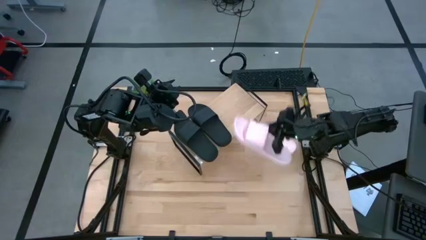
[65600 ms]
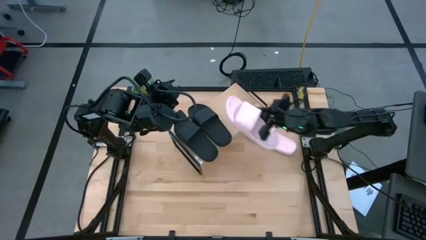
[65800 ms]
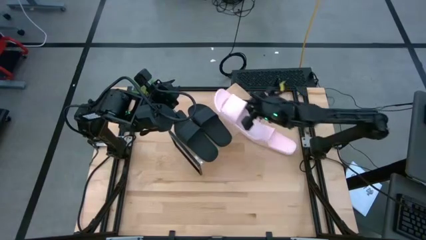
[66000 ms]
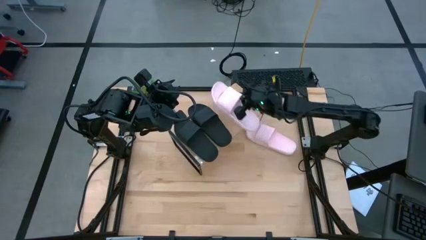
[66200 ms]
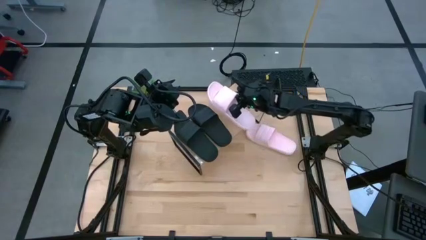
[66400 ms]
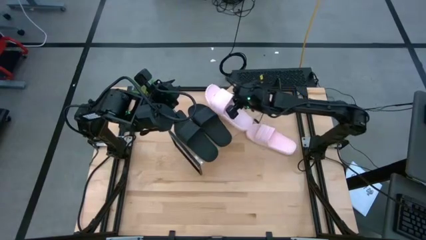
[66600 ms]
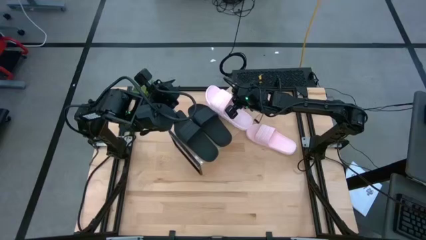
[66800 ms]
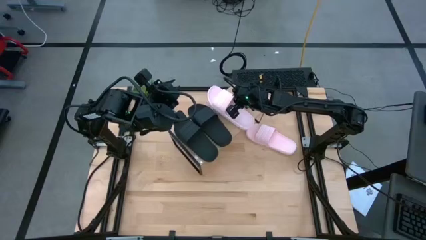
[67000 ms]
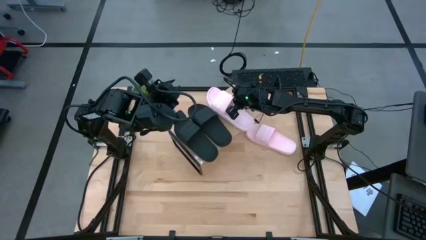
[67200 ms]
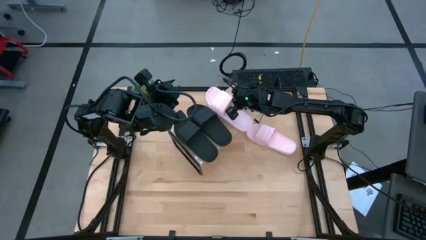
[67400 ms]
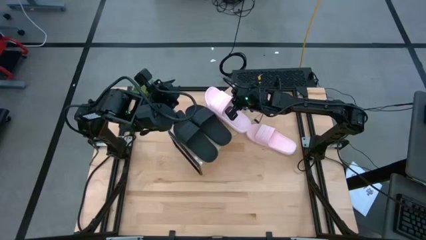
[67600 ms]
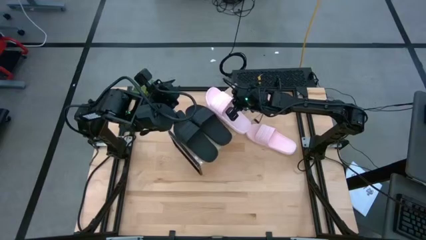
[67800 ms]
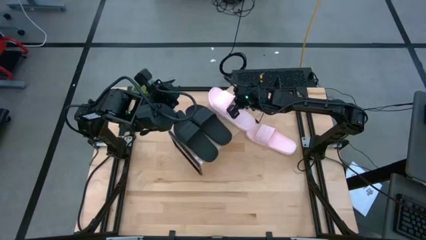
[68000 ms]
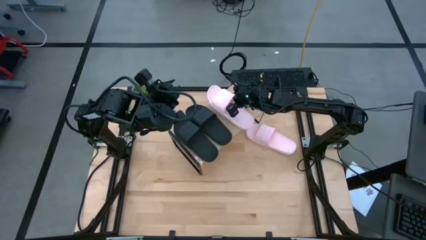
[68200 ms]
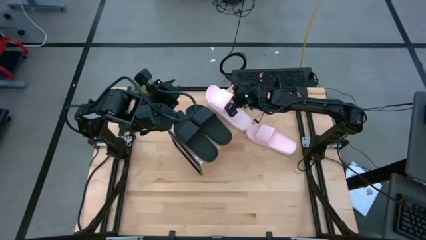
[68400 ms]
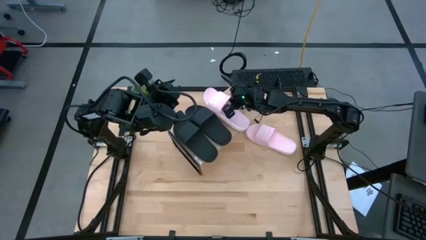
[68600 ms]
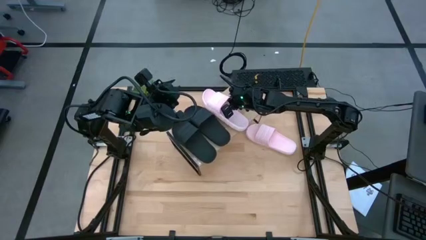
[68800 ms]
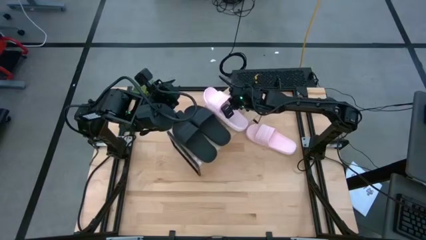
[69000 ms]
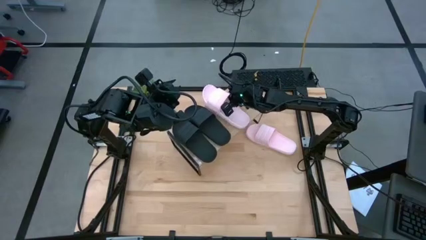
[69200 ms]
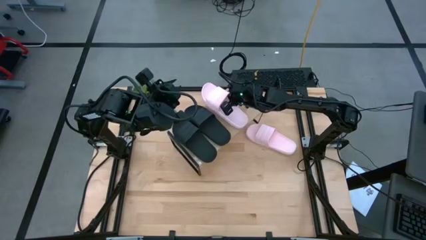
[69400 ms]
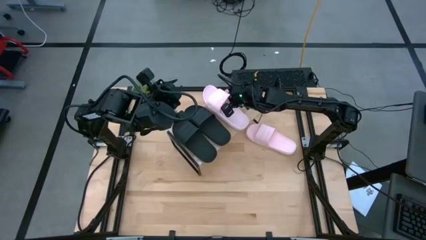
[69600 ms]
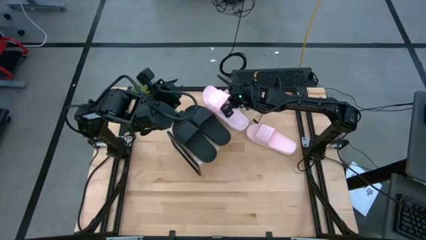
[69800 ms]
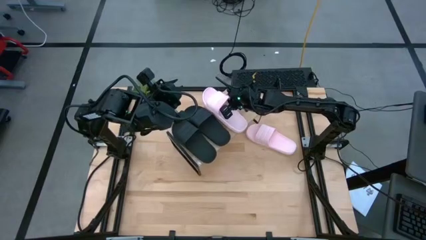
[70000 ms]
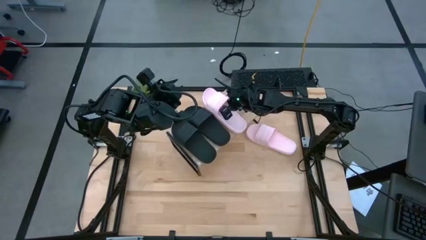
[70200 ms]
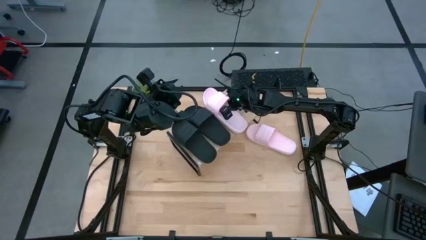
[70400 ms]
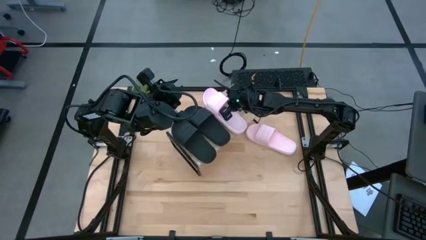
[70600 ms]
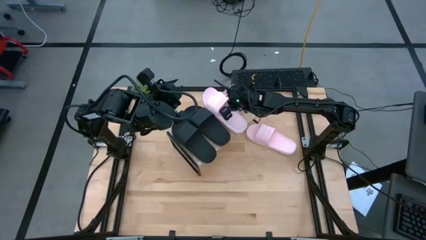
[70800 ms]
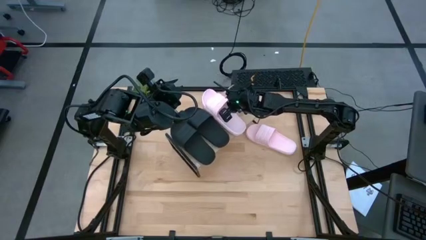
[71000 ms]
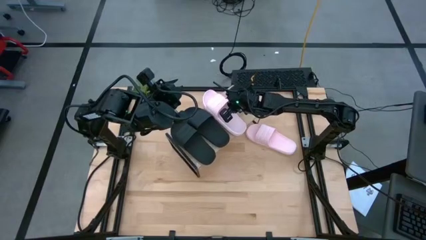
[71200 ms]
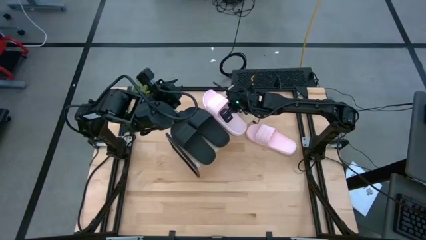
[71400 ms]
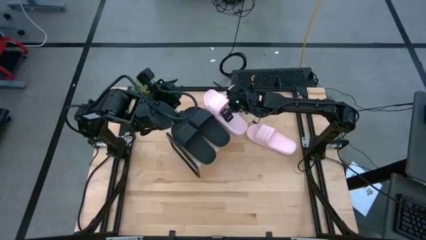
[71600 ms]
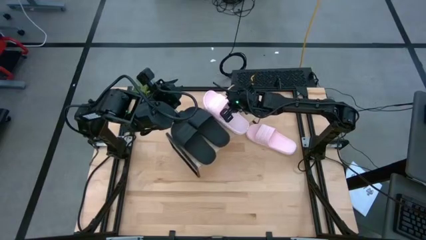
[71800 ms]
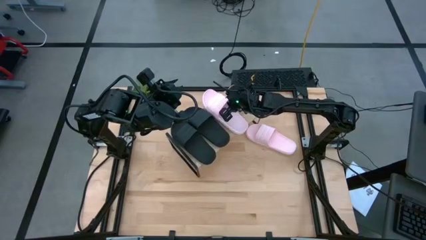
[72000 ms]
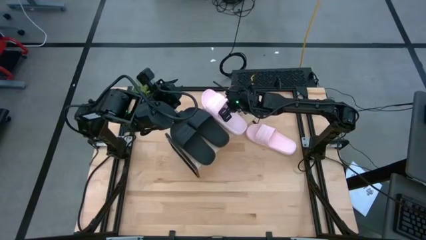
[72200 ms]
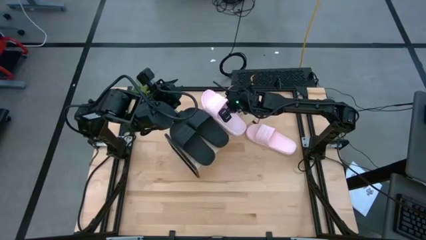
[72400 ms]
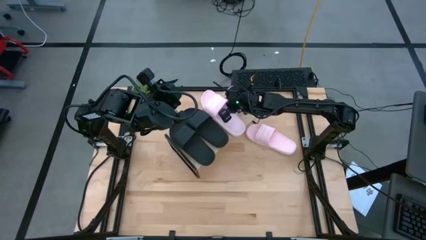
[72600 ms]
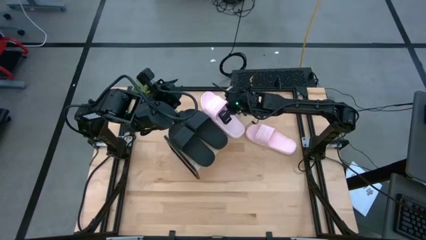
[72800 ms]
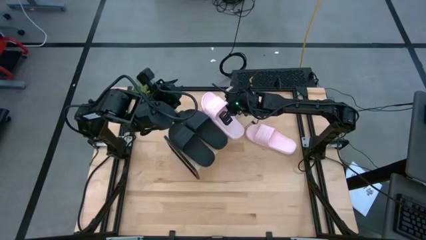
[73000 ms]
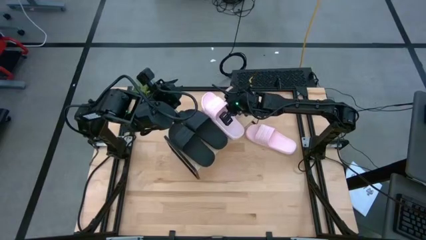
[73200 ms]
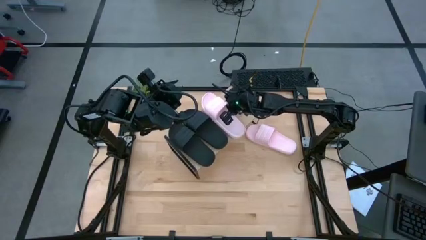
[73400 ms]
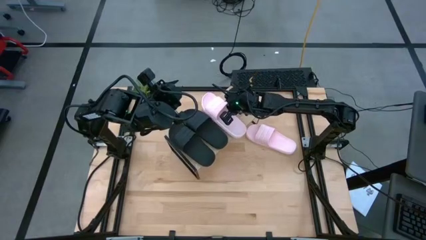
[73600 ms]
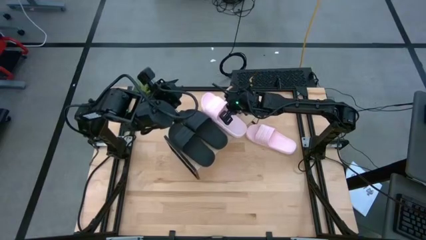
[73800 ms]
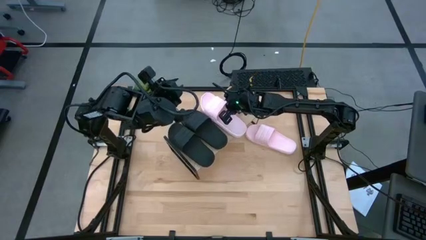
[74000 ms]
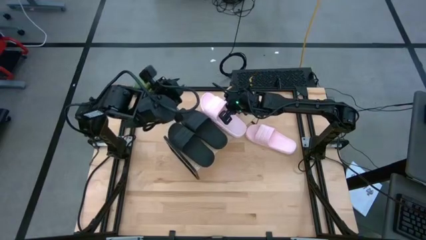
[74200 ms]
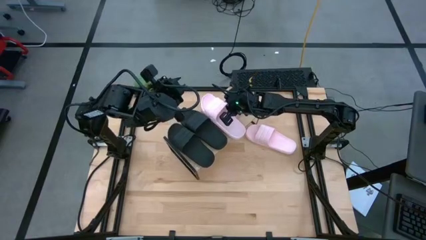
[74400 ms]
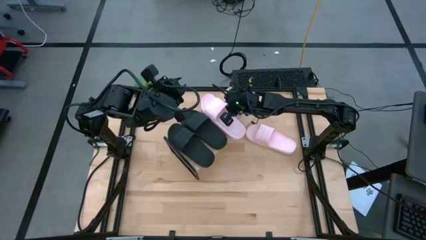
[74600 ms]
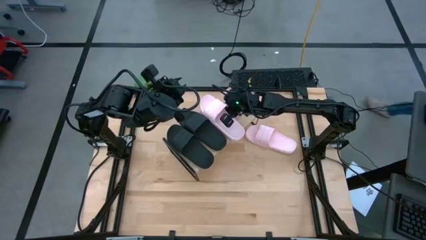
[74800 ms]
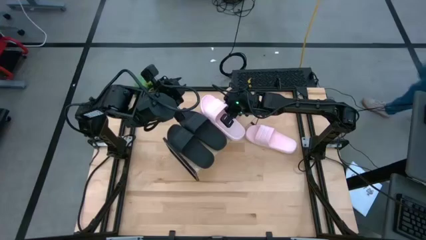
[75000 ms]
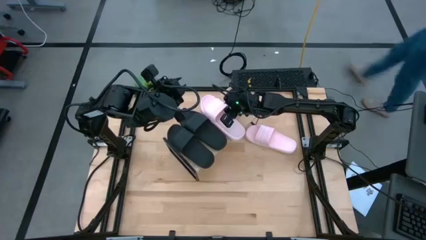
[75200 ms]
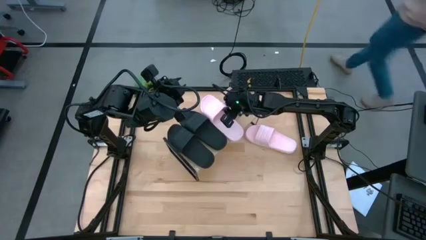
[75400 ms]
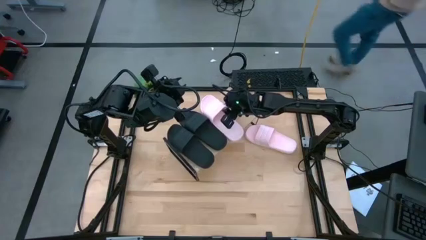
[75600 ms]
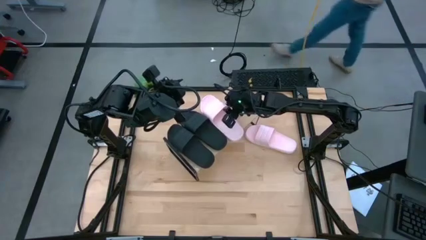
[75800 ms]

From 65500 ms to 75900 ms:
Task: Pick and place slides into the shelf
Put the left pink slide on the shelf
